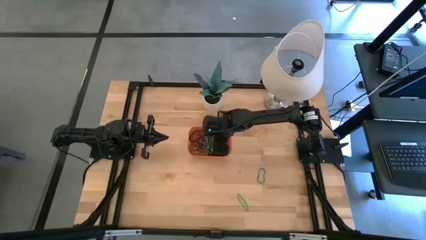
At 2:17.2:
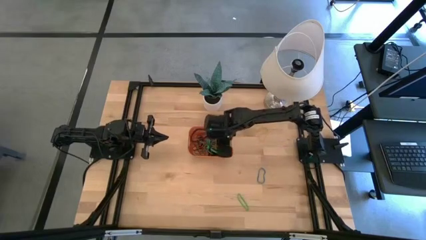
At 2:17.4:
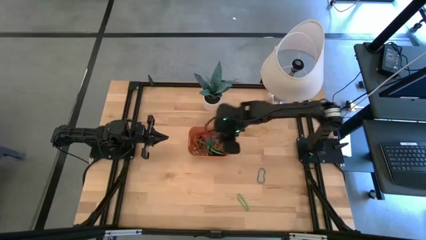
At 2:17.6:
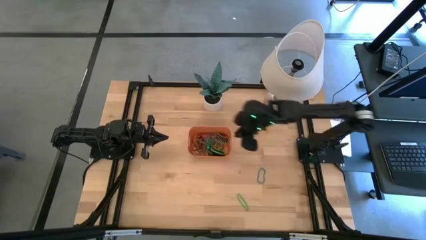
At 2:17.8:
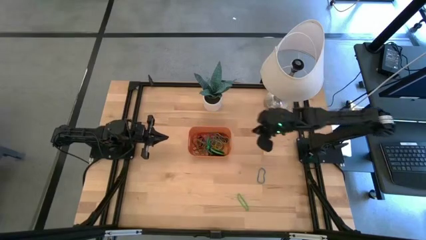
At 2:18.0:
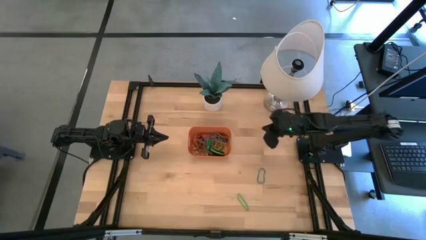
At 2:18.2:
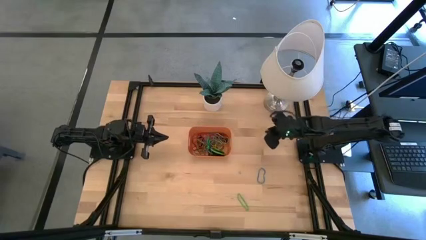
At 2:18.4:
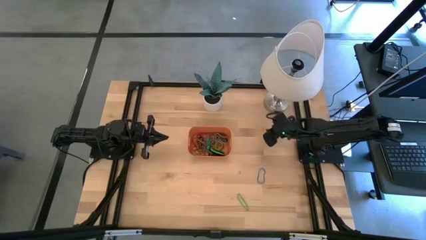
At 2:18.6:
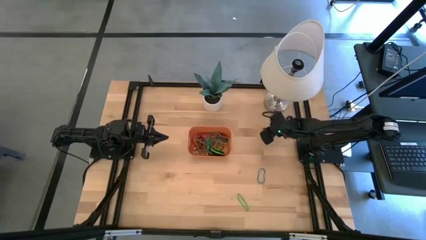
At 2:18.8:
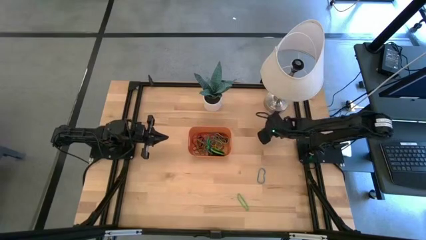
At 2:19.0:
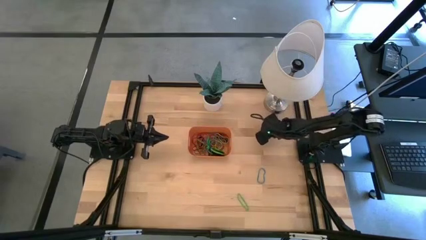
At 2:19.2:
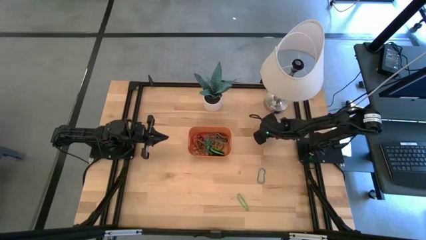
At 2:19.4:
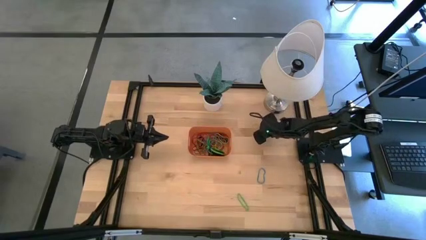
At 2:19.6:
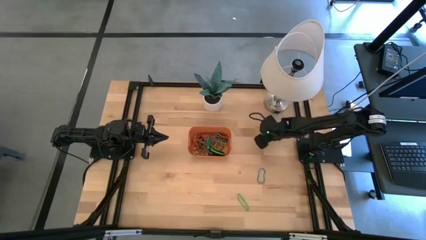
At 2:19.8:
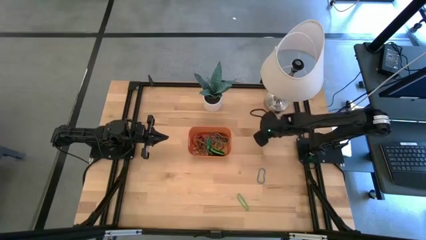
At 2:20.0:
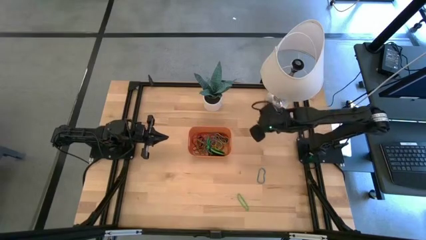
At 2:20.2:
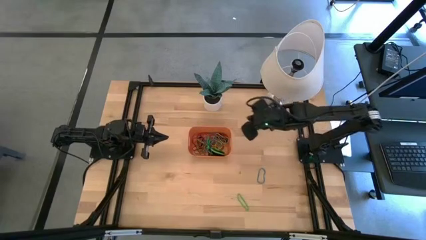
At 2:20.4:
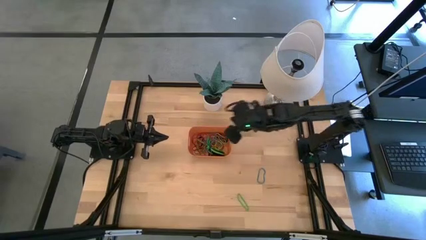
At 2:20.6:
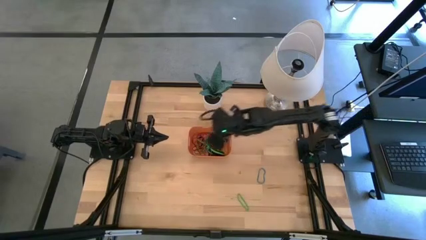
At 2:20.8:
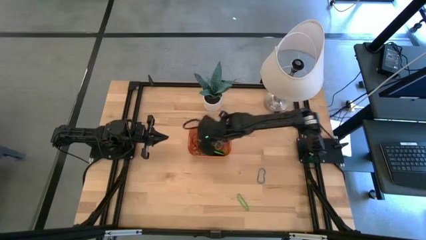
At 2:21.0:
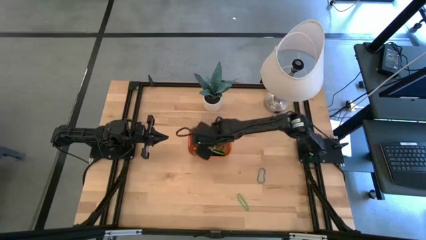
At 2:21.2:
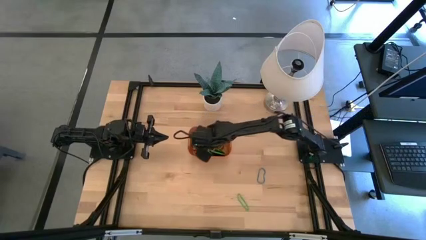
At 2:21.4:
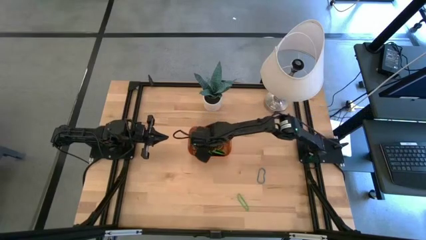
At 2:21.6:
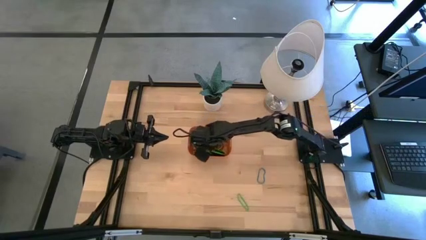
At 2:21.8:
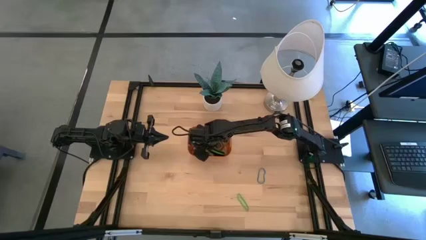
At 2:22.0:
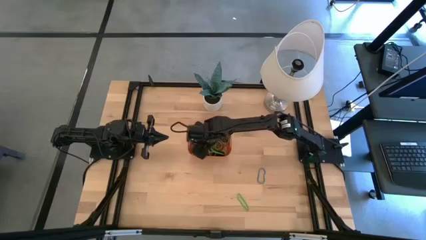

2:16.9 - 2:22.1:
Task: Pick and place rubber bands into bin
Put the yellow rubber band into the orange bin

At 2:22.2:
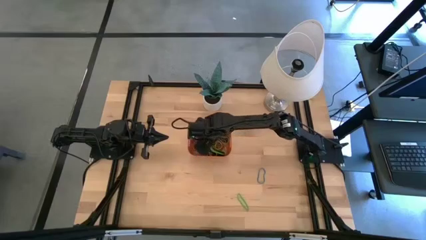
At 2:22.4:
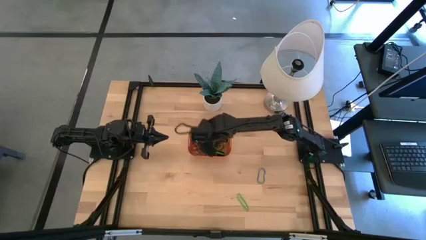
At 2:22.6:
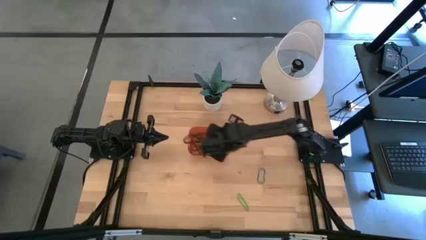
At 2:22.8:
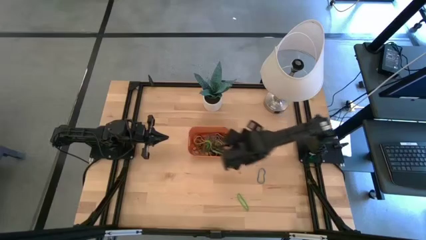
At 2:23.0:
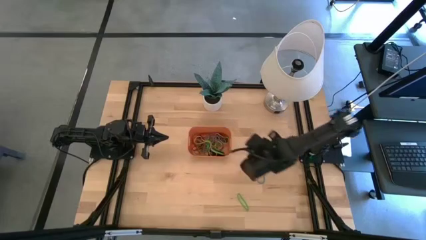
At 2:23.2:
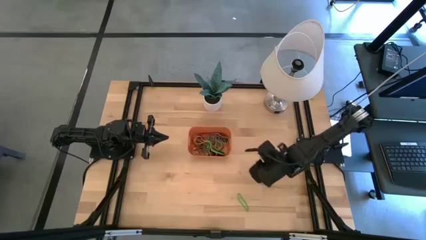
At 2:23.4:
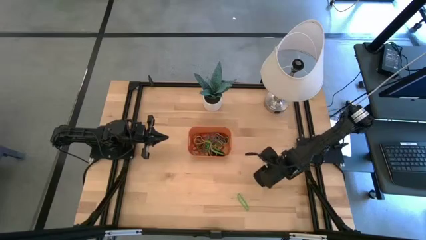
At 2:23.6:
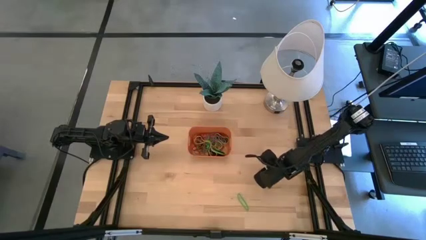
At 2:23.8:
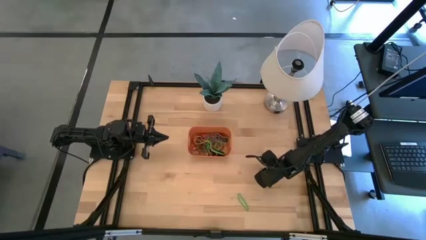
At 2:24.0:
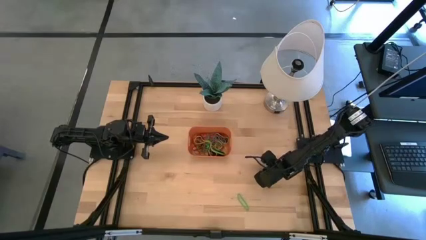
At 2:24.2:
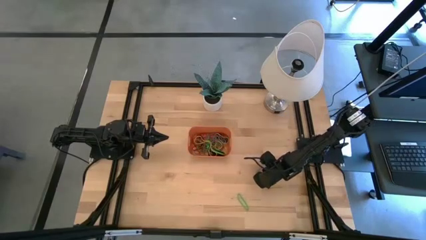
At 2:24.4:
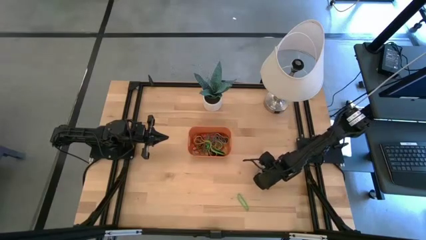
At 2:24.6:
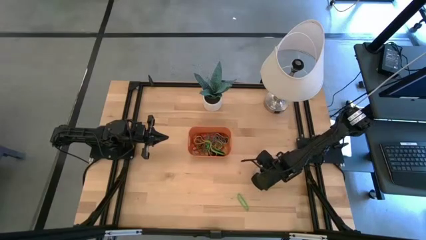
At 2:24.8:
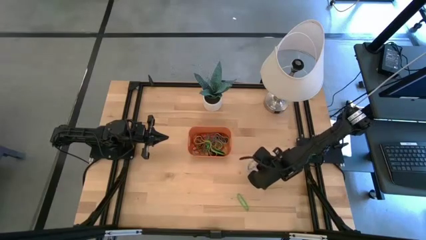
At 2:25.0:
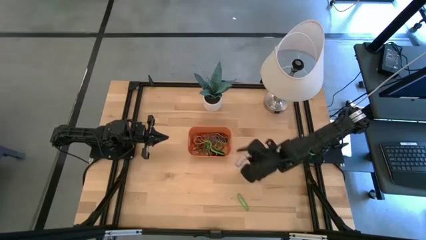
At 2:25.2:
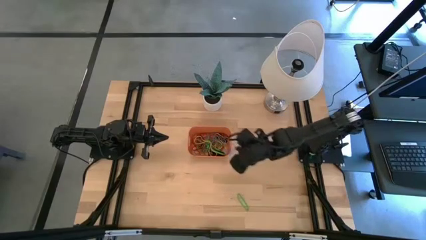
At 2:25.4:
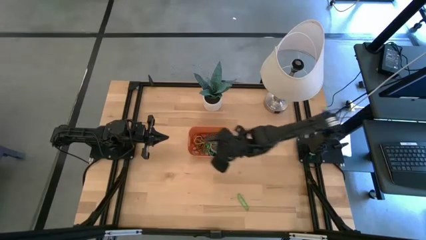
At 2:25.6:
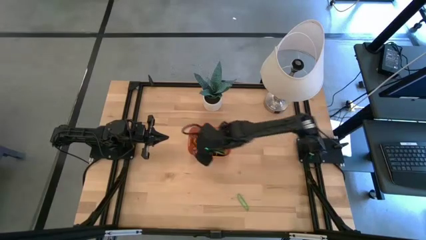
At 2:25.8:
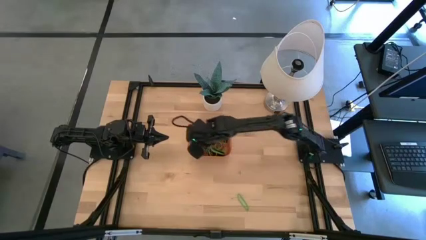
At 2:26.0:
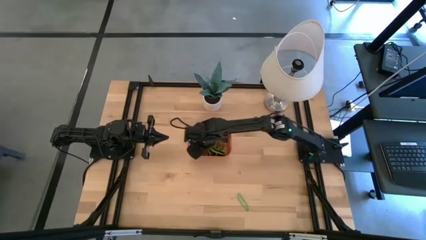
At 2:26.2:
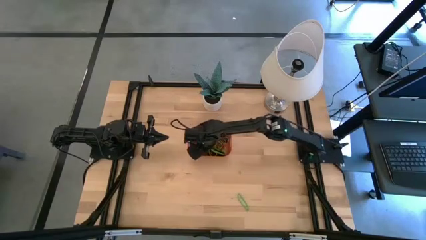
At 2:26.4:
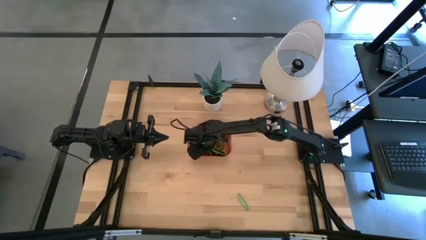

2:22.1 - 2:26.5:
Put the blue rubber band into the orange bin

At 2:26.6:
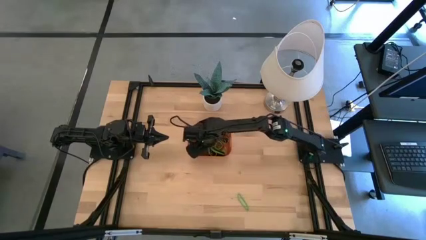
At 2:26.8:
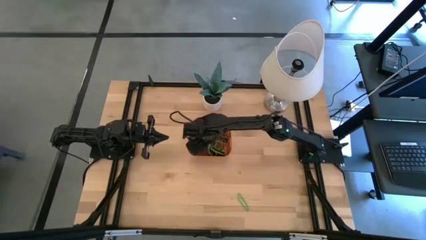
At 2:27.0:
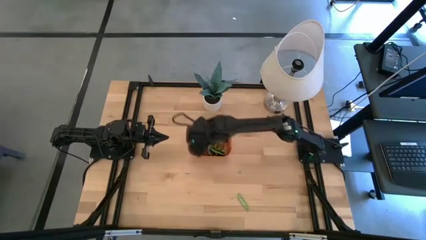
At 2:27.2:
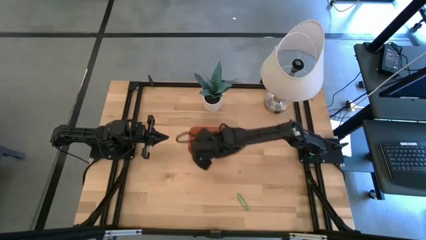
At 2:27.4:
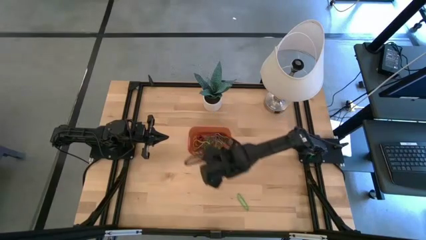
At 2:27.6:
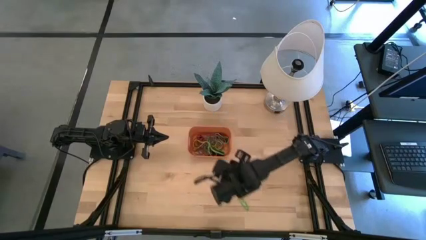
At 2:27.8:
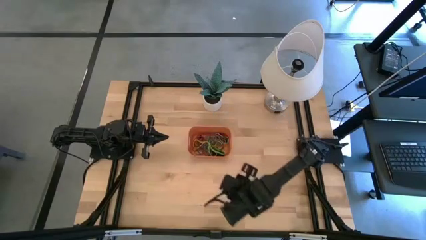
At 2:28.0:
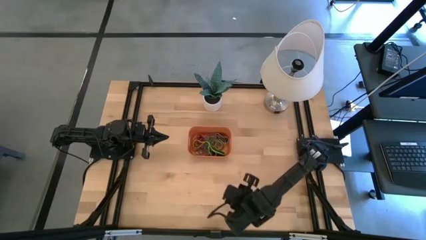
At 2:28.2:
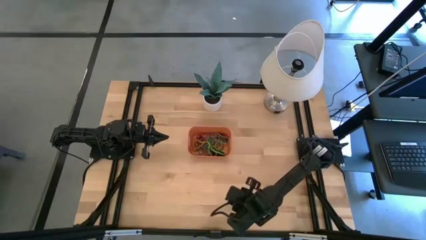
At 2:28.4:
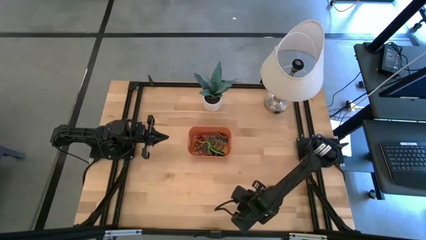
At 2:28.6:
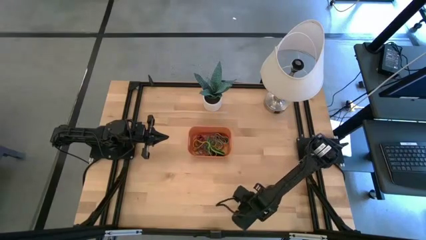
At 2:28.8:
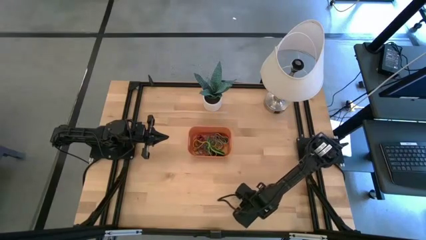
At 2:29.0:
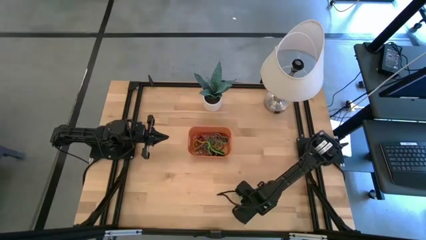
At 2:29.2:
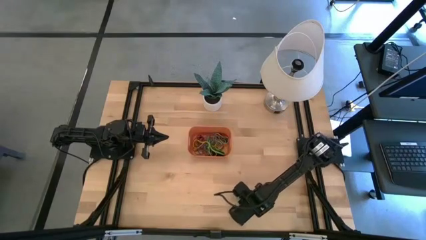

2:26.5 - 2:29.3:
Put the green rubber band into the orange bin

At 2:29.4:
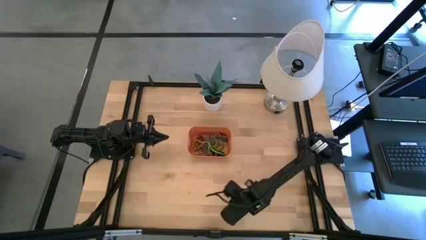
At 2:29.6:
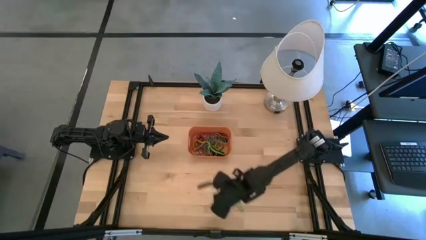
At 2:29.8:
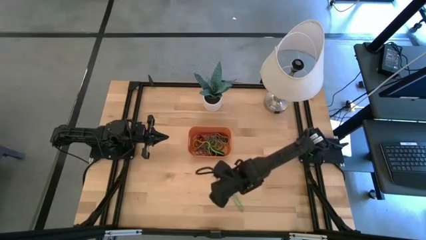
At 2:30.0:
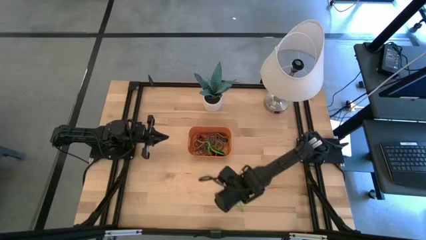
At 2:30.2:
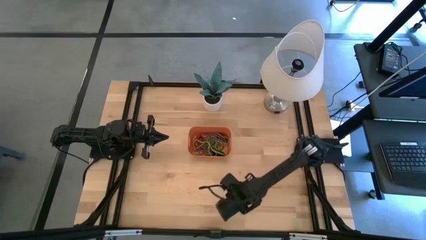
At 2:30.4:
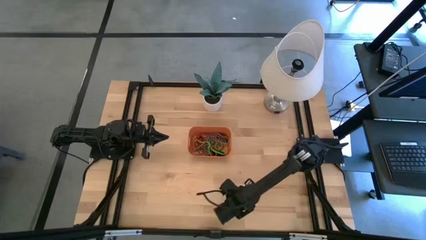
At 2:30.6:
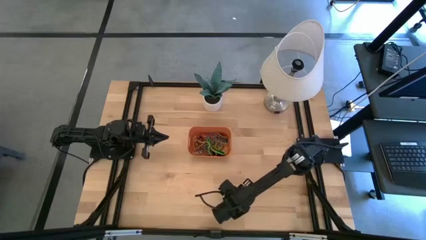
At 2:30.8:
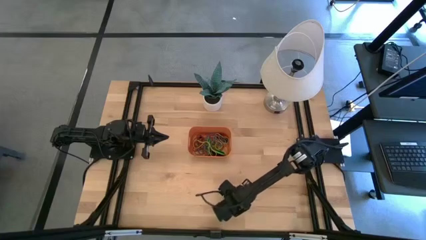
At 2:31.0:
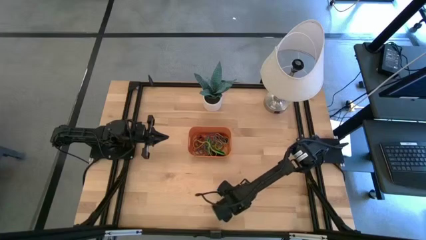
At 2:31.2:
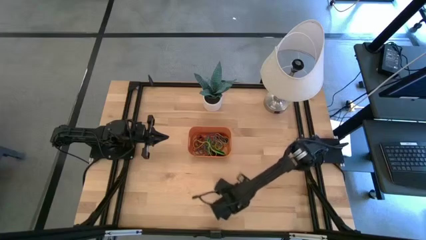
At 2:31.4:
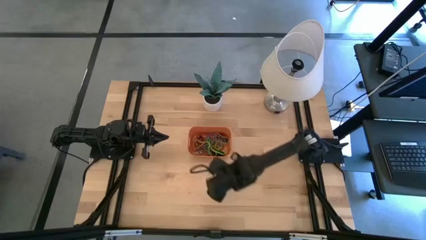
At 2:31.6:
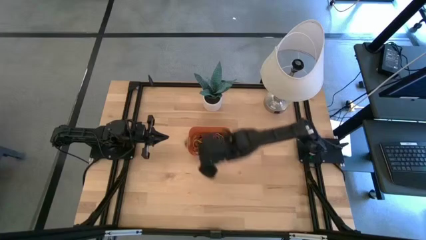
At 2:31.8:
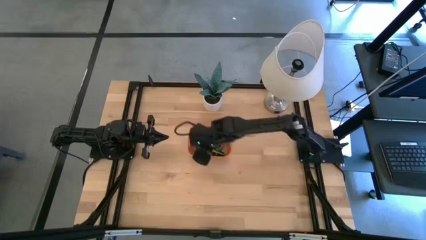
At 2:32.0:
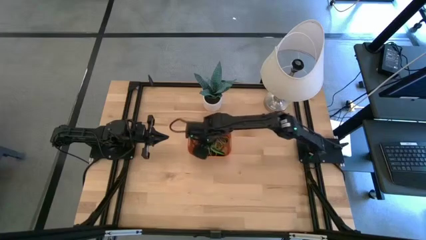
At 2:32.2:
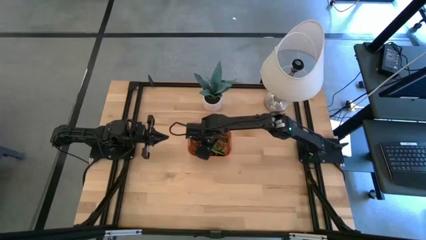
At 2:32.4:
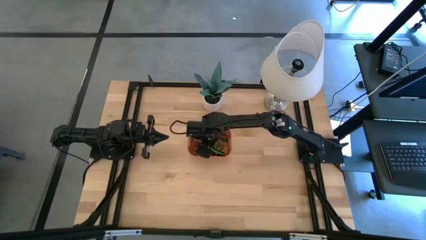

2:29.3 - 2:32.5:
Put the green rubber band into the orange bin

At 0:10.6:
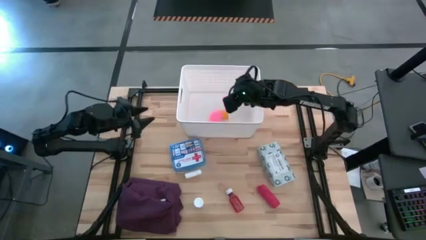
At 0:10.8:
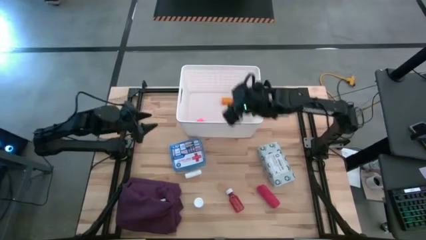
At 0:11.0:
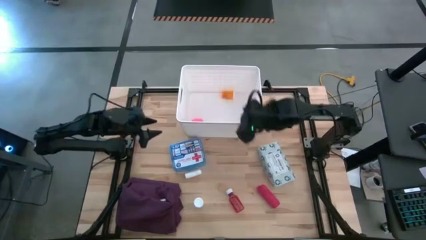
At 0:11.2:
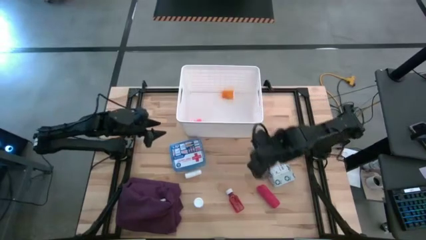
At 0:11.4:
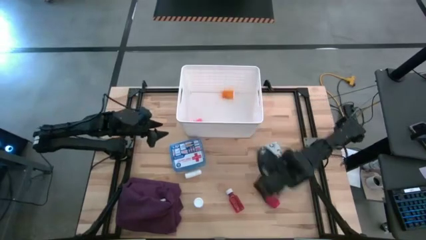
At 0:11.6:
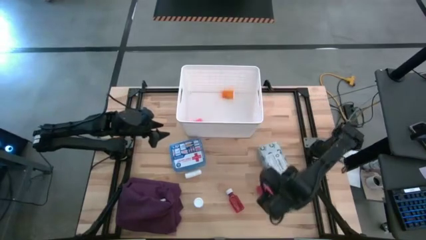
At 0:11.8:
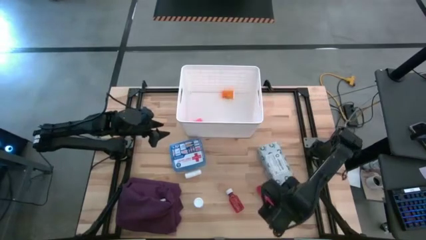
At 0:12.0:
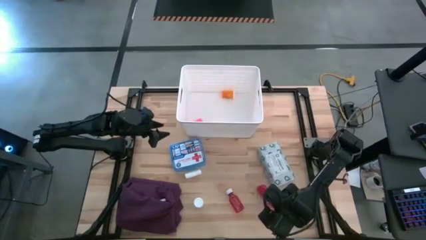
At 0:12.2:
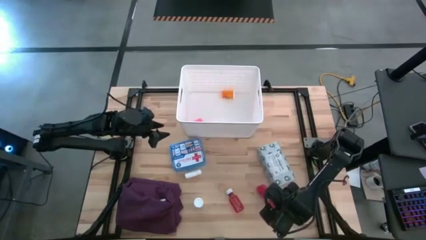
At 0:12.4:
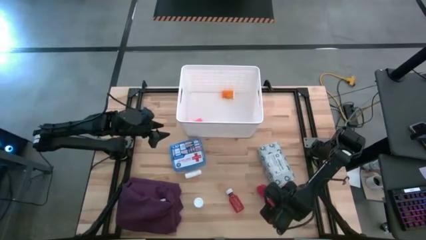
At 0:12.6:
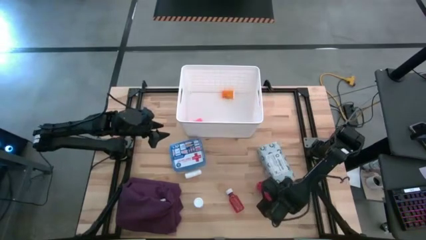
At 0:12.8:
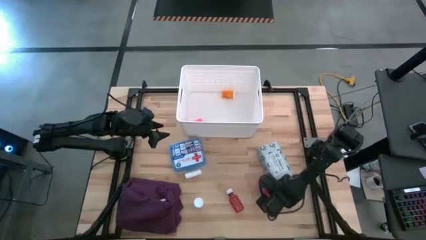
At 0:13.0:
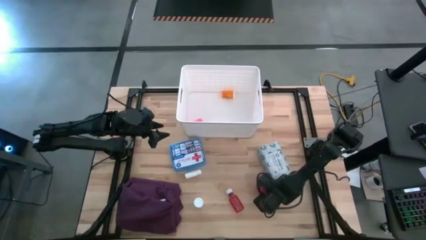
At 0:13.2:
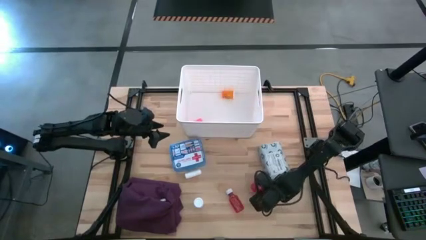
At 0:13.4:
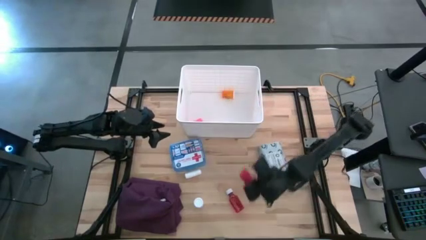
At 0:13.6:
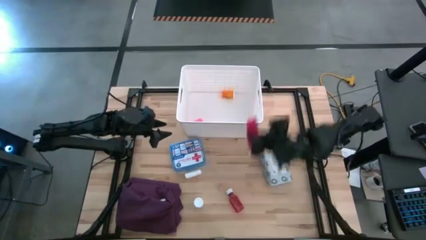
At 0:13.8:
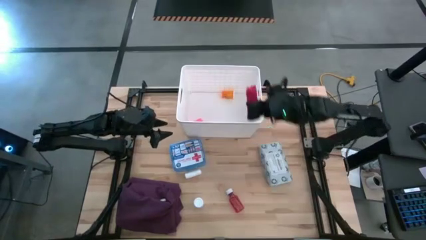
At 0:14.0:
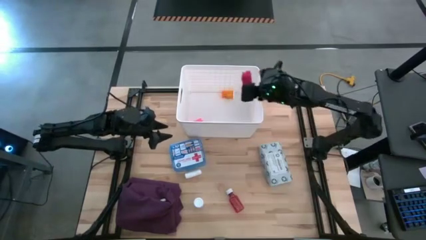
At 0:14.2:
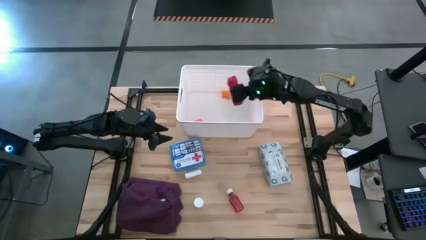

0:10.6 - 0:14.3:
Task: Pick & place medical supplies in basket/bin
Put the red bandage into the white bin
